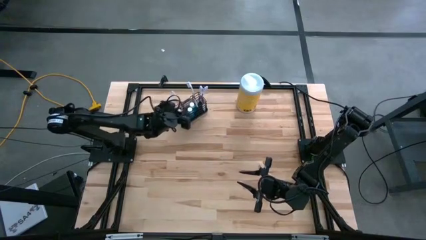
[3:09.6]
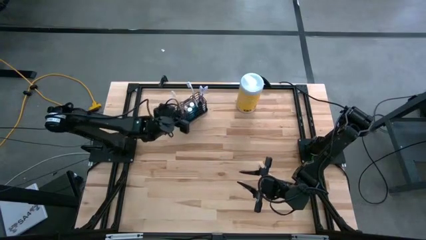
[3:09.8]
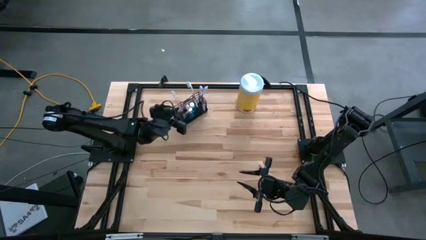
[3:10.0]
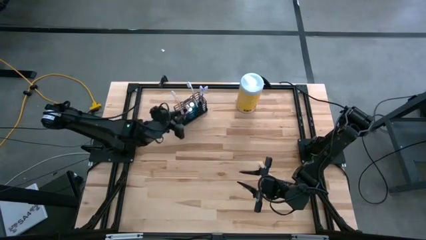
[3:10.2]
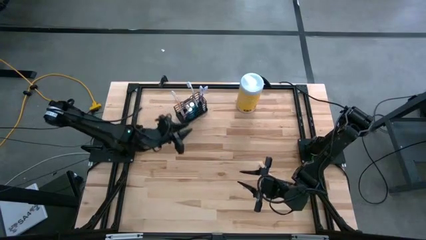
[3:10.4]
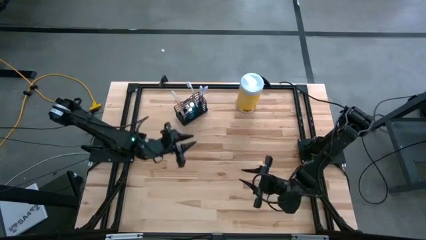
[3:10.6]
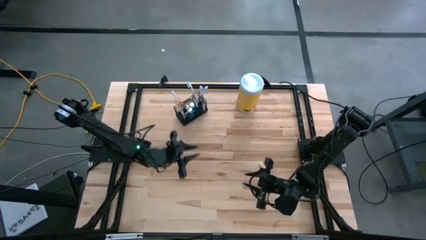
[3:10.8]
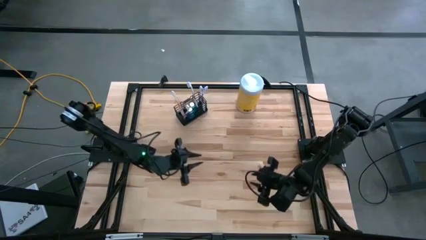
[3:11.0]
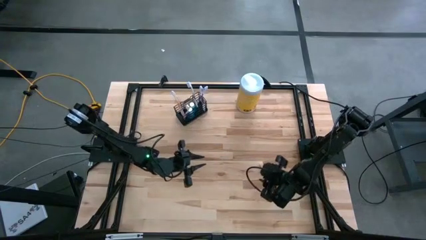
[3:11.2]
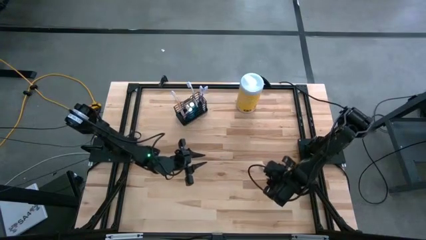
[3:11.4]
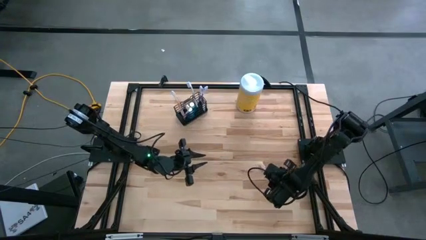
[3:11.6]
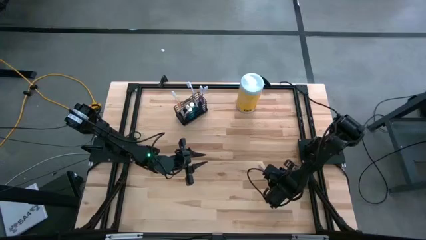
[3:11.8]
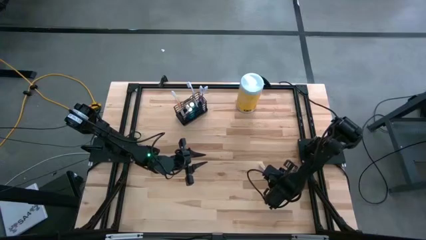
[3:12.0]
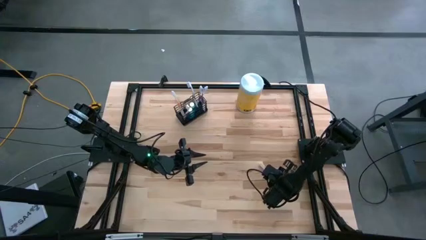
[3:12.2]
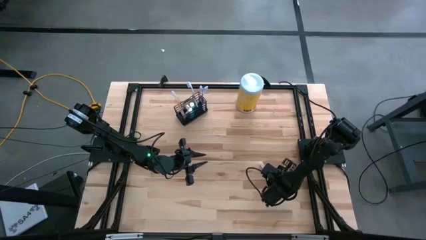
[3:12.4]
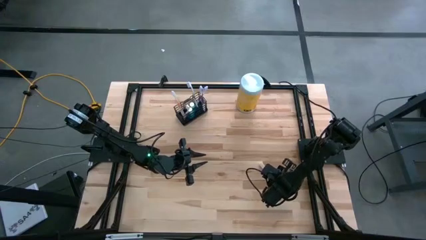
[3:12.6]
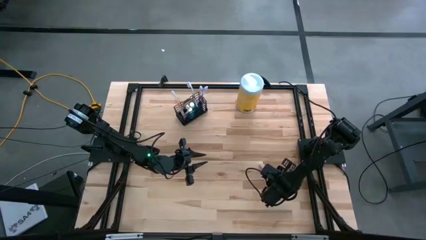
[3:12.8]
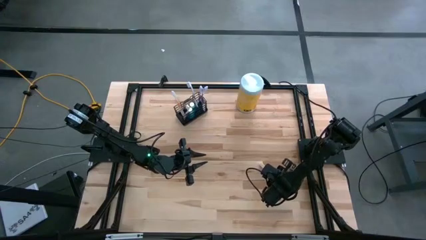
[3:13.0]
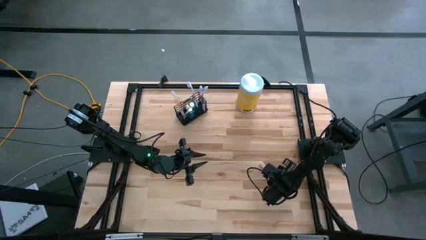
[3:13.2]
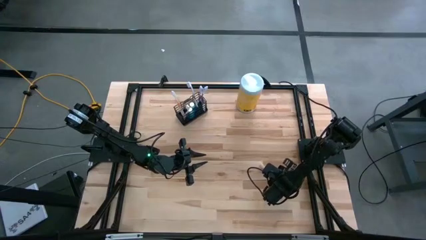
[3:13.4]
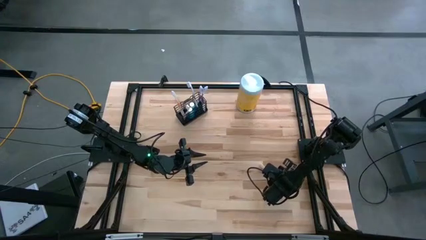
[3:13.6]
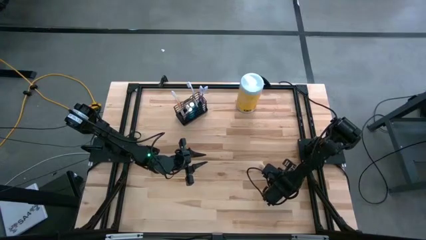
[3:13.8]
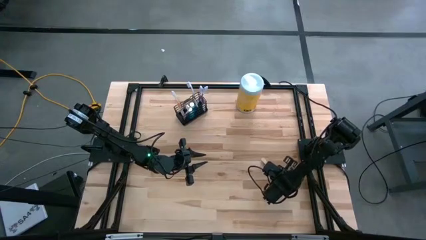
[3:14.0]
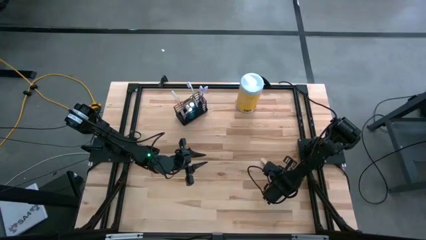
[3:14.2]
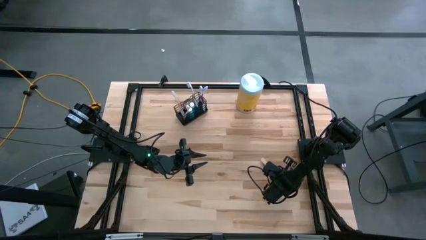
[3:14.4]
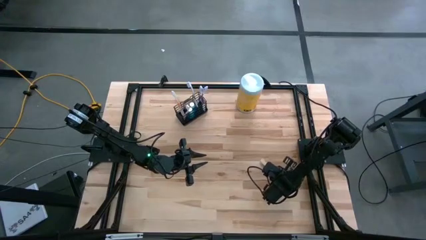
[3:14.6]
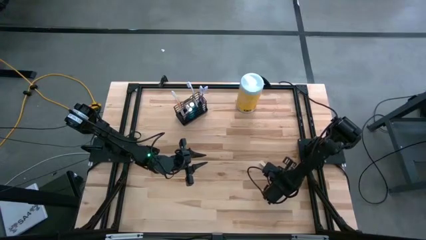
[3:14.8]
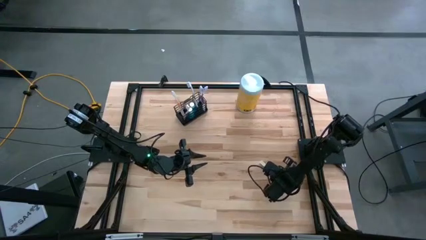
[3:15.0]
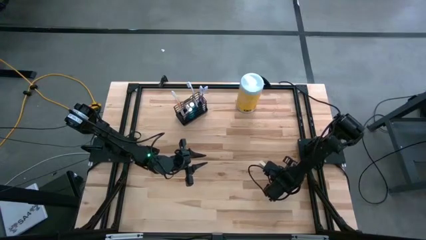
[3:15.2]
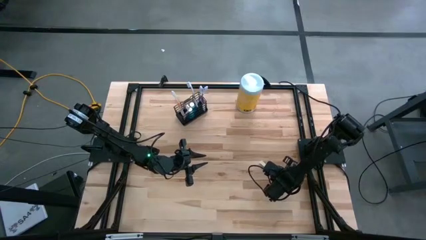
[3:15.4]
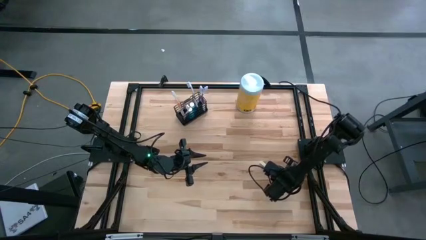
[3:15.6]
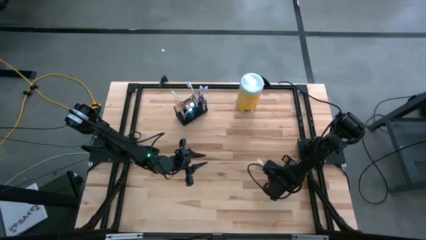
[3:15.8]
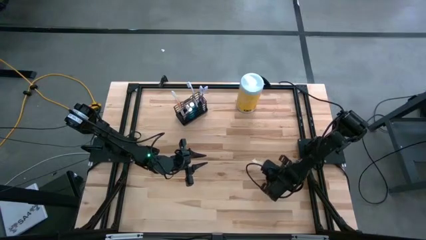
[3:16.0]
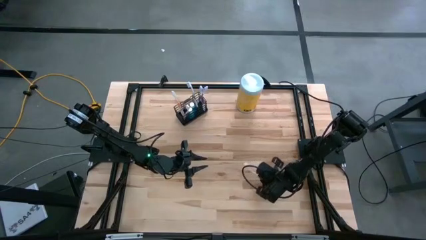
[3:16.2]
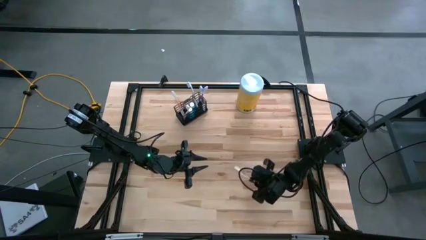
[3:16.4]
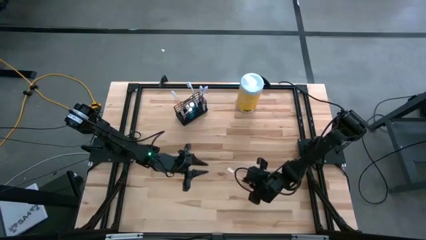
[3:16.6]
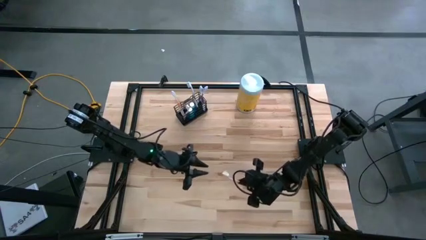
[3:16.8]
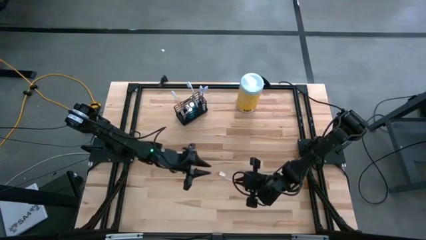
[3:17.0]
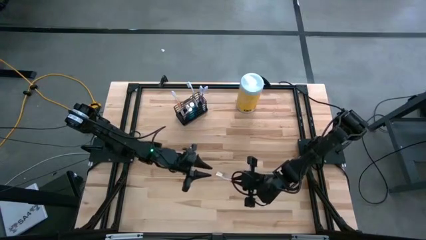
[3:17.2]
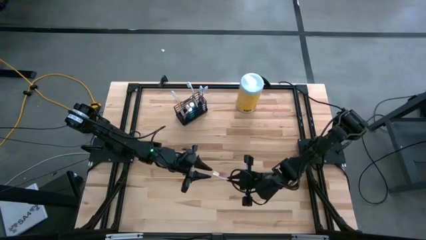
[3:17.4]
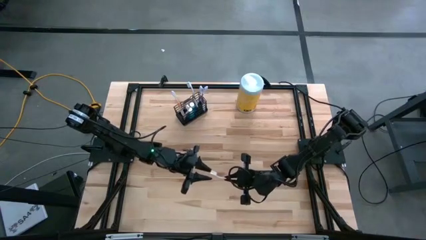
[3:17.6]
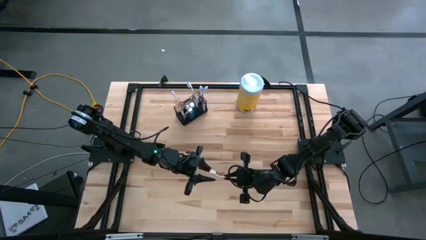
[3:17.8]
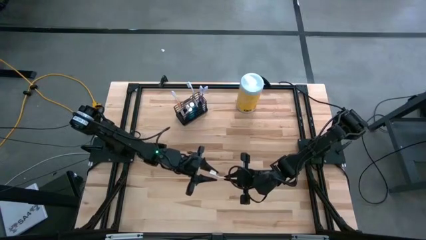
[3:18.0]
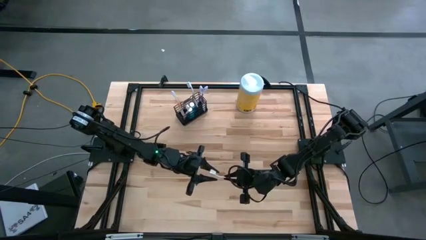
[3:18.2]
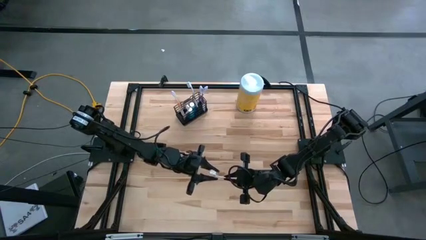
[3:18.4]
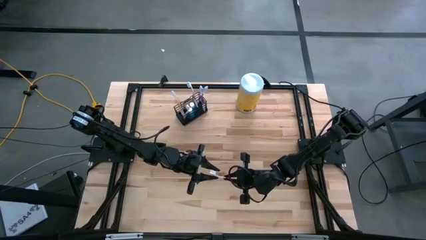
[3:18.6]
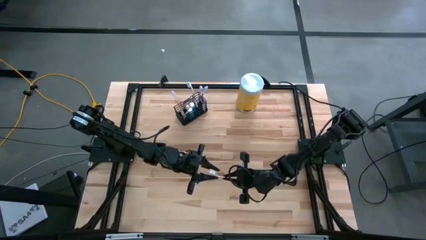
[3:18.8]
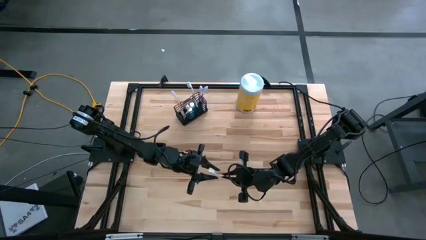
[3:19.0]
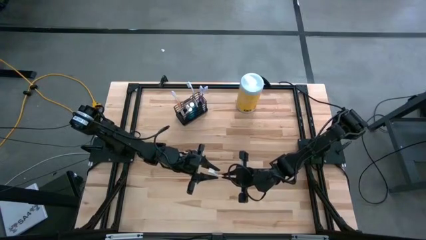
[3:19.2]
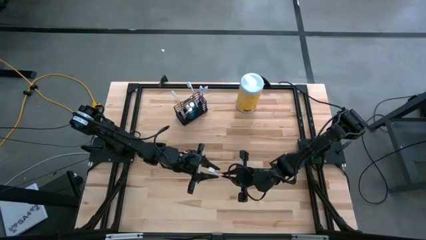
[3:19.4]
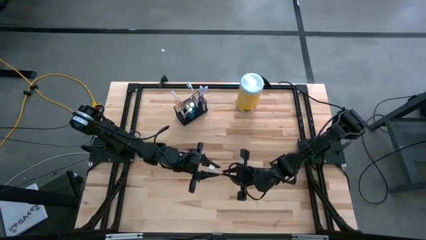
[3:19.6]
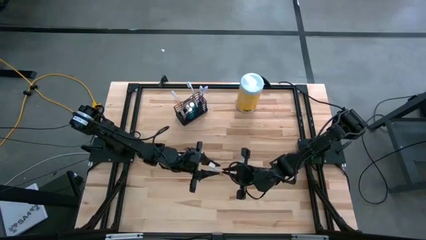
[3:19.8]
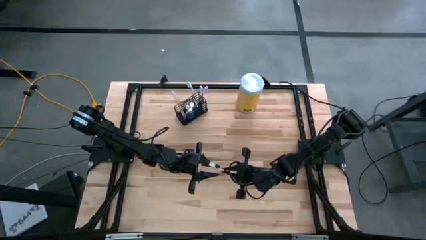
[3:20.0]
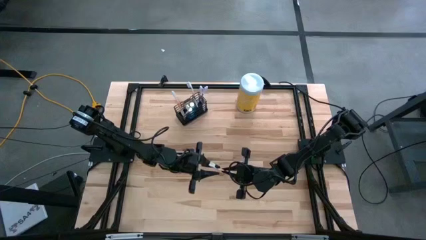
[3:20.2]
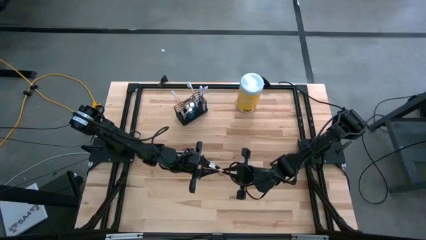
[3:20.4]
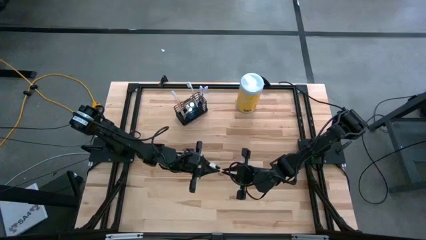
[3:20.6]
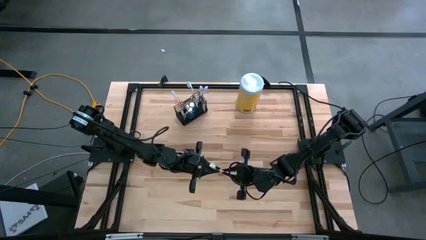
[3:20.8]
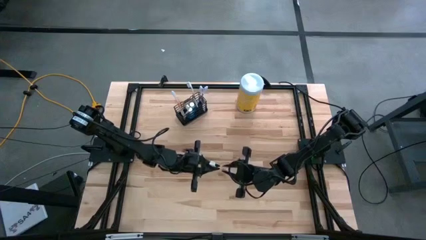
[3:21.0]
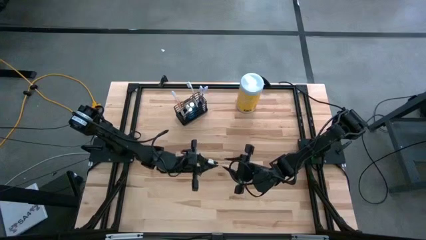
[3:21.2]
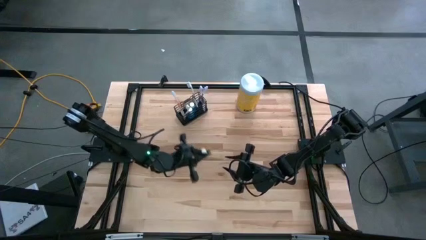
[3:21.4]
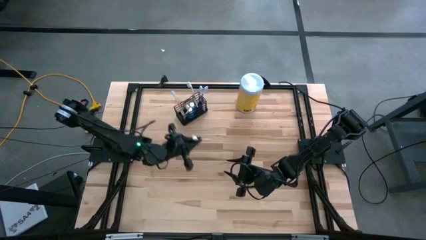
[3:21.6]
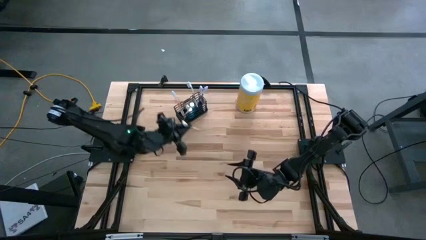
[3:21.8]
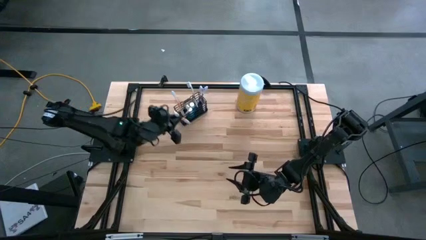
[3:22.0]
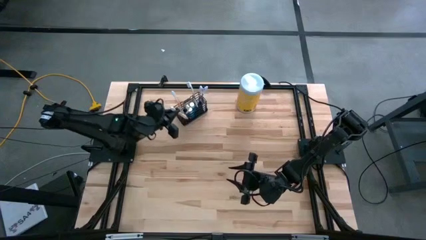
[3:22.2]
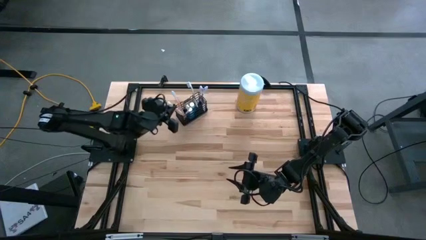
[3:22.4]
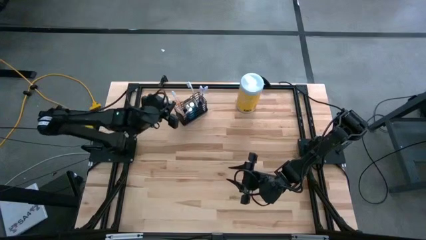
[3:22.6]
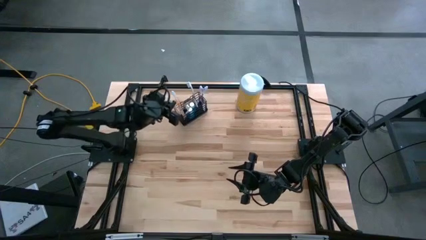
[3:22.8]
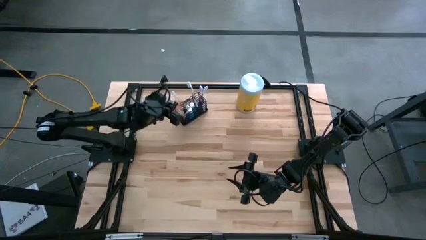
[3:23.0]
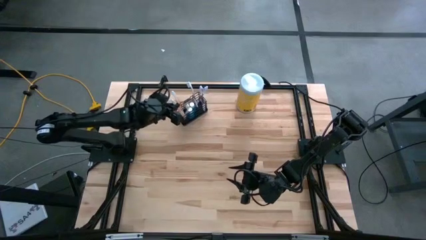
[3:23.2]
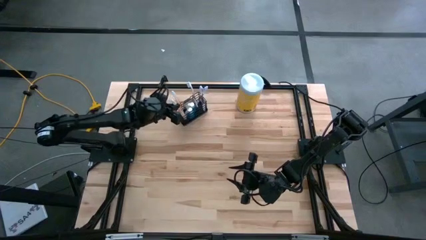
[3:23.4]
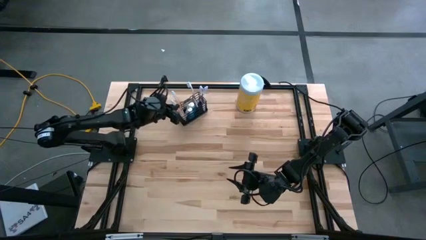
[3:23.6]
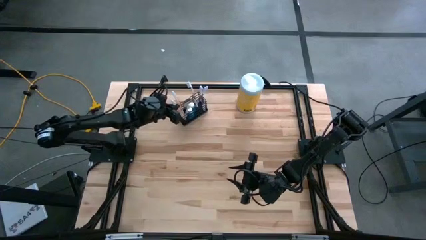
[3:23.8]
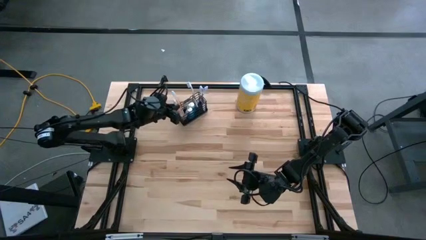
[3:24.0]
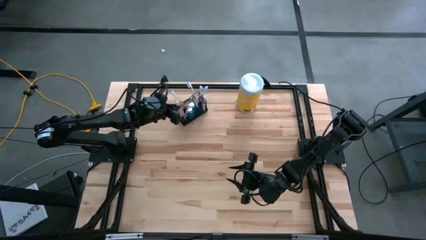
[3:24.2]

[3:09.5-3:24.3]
Task: Pick & Place toothbrushing station
Put the orange toothbrush into the left section of the wire organizer
